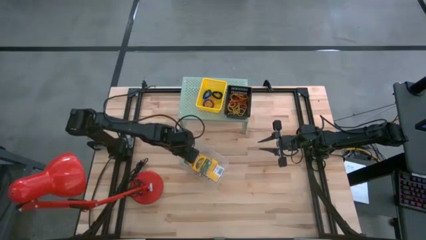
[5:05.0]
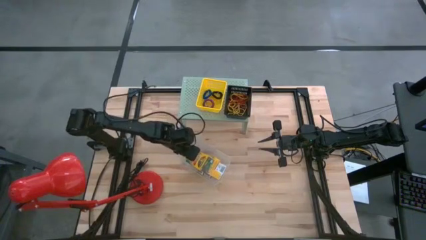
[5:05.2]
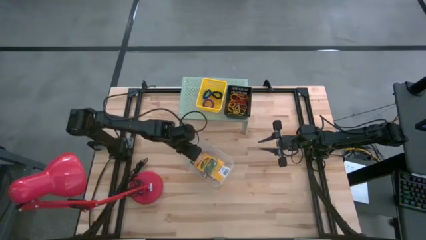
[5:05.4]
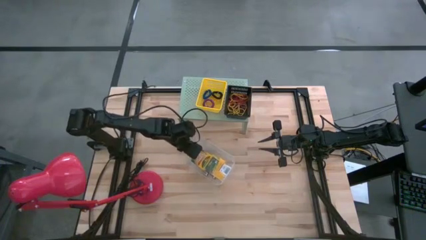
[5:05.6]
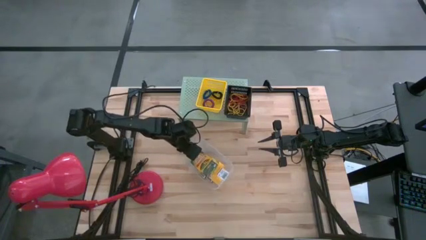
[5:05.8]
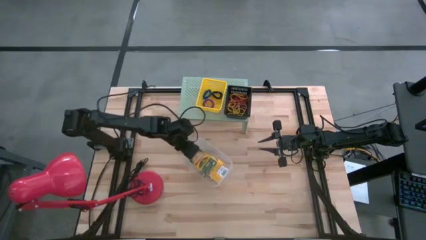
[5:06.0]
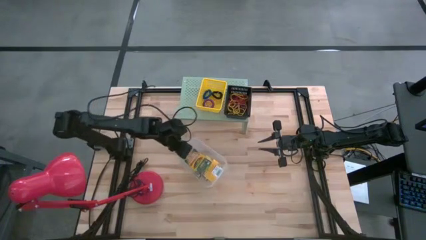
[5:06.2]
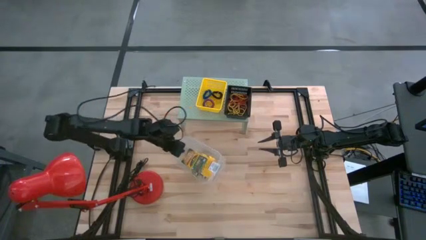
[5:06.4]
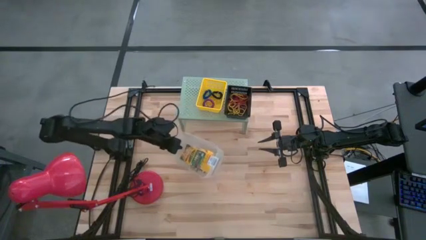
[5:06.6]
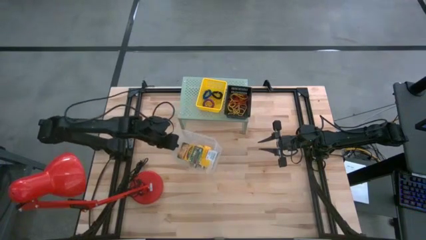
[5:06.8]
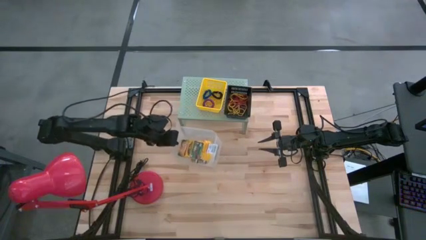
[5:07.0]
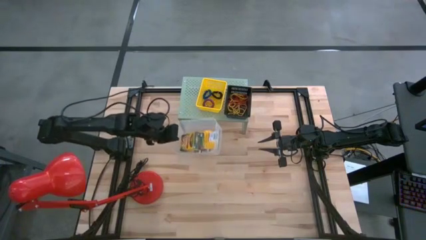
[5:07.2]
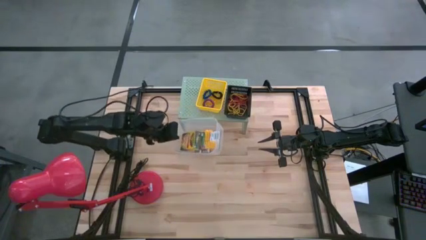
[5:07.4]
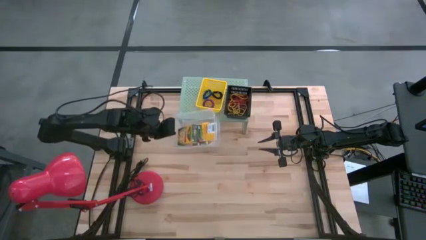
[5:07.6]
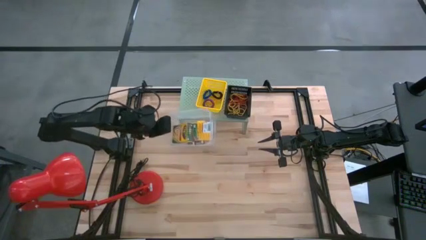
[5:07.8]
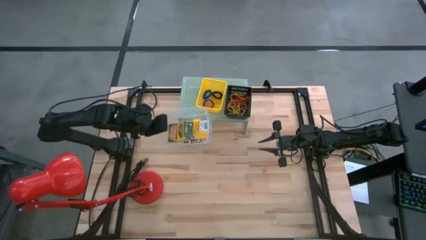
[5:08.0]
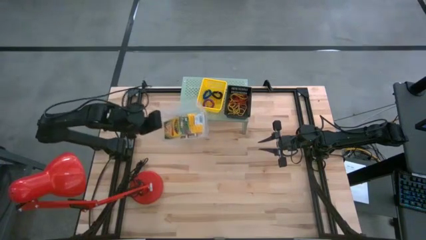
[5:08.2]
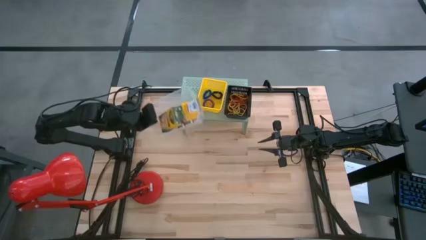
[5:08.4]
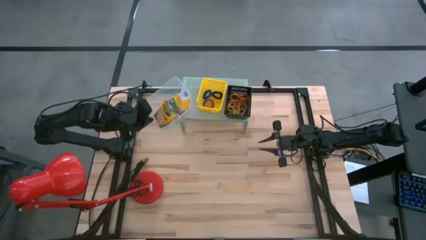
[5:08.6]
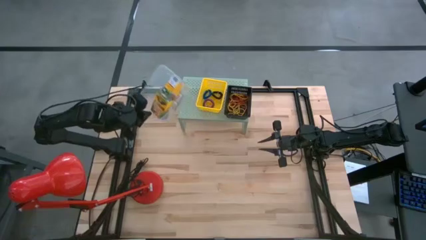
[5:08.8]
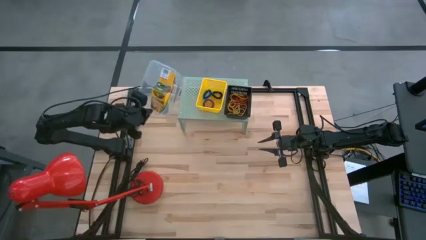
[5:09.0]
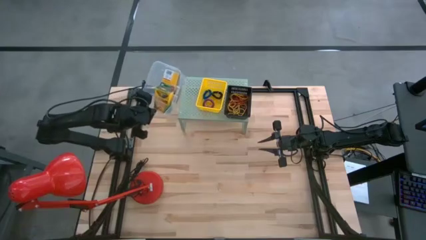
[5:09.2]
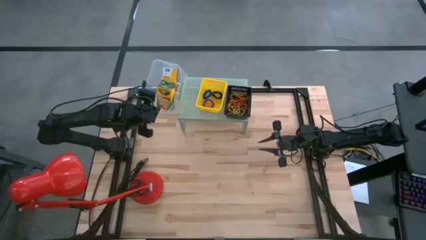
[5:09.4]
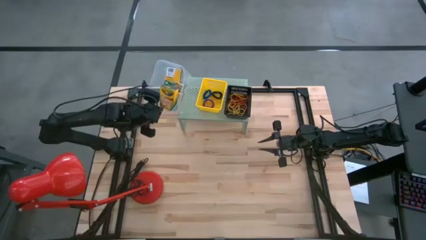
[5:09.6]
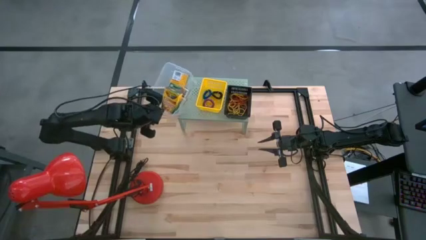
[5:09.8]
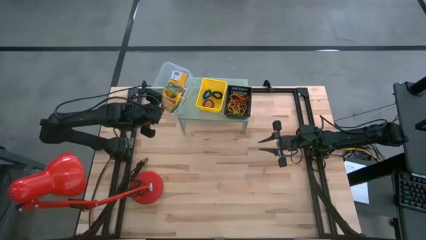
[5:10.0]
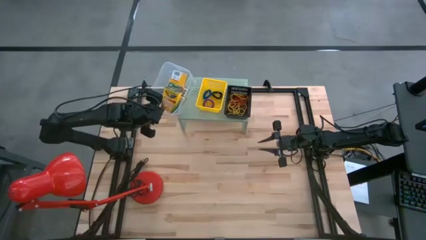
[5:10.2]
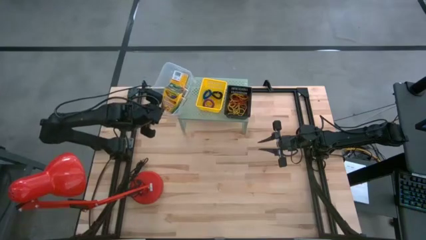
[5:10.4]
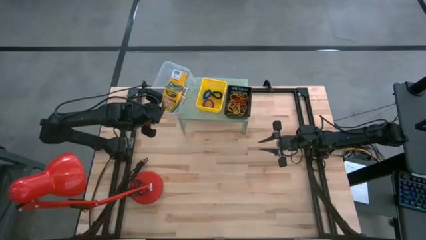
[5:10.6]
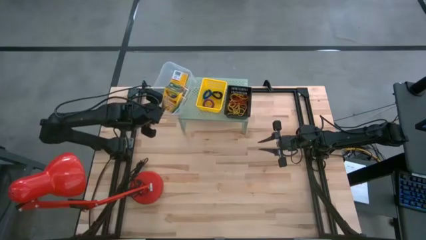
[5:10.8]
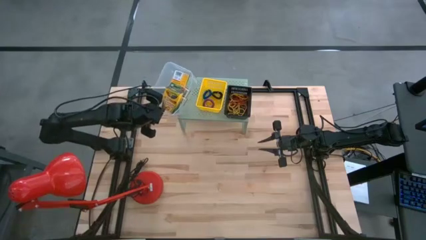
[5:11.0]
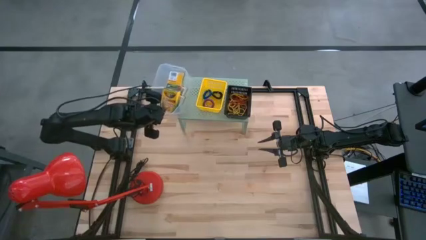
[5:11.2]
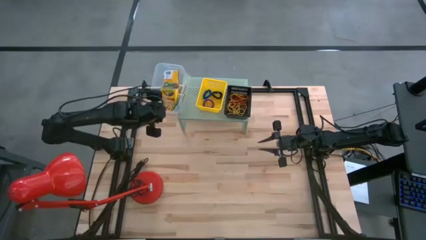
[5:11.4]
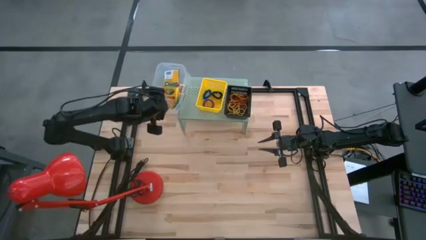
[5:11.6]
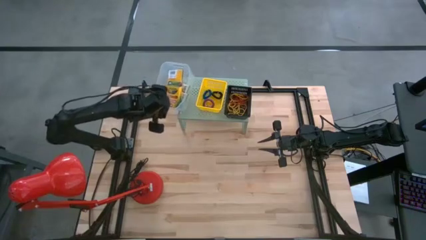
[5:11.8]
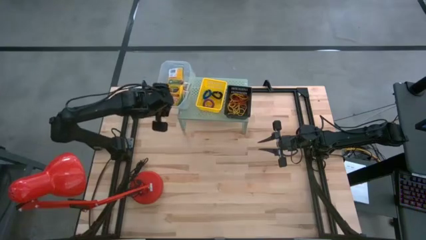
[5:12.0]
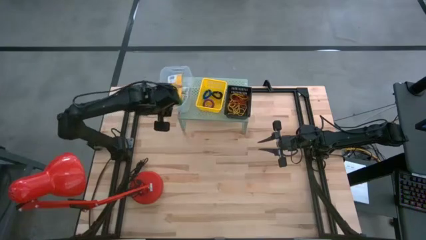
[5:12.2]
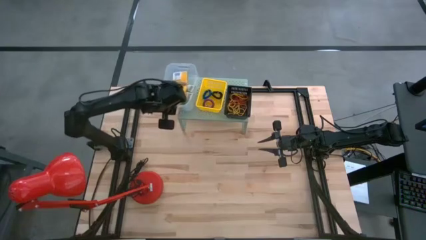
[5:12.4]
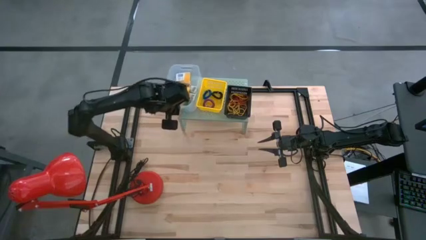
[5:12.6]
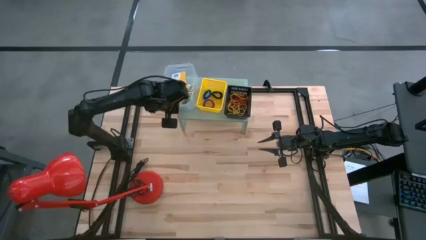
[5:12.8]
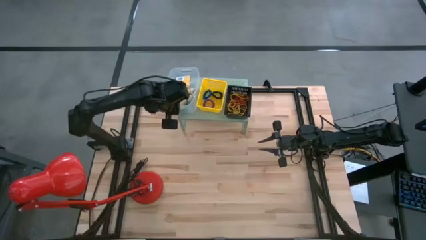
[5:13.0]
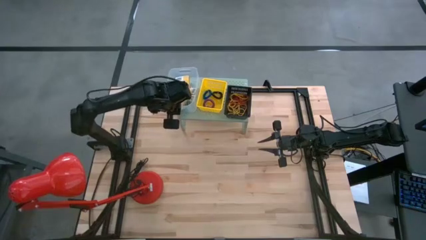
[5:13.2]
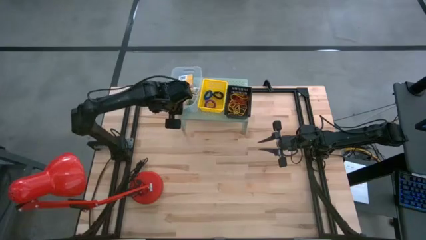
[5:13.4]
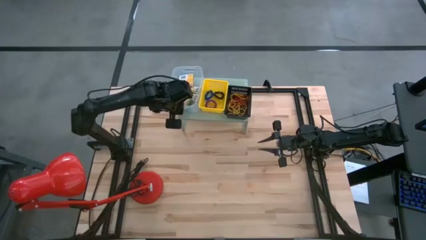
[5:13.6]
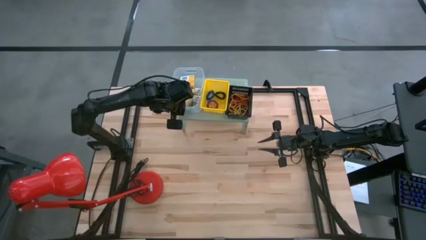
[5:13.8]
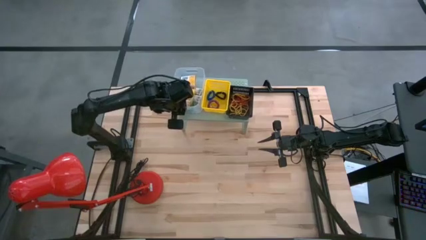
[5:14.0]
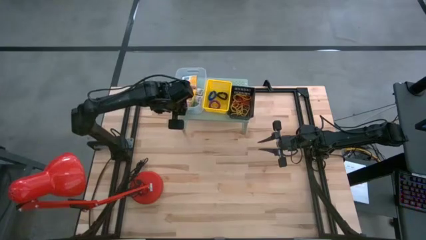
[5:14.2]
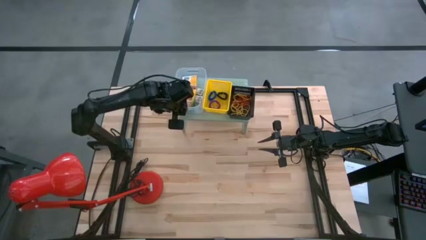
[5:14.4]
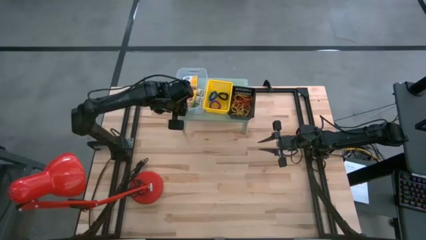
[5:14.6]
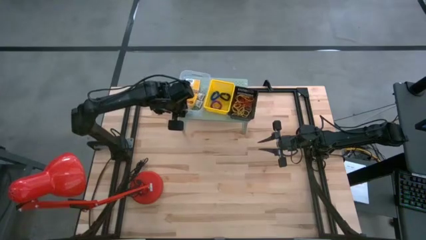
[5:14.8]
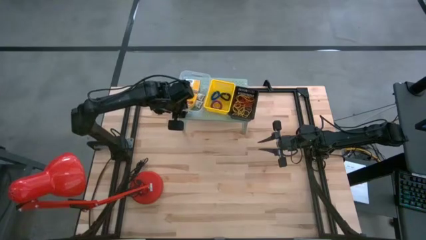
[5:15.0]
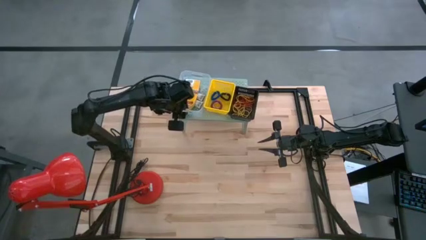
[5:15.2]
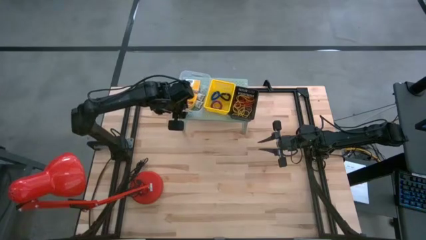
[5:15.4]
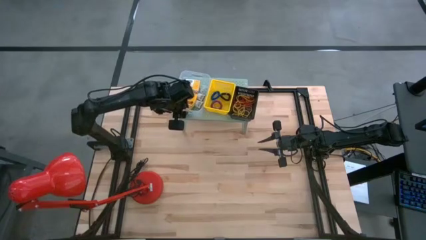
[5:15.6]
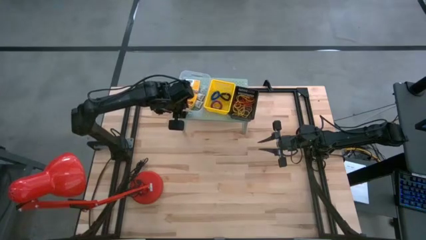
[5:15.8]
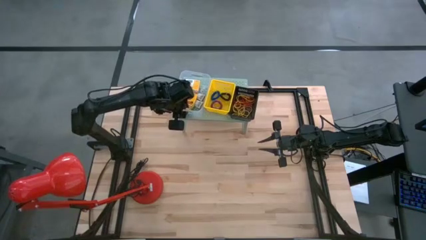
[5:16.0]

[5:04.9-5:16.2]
Task: Pick & Place Office Desk Supplies
Put the transparent bin on the shelf
